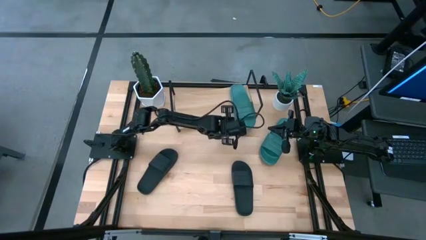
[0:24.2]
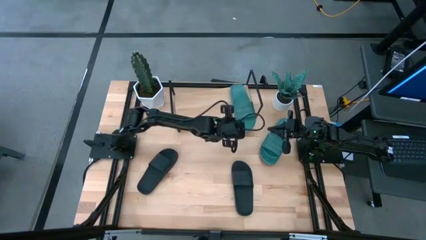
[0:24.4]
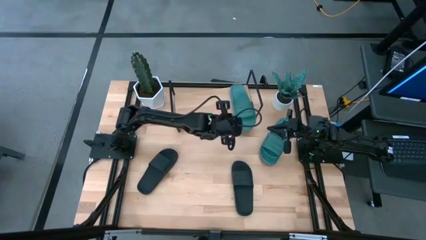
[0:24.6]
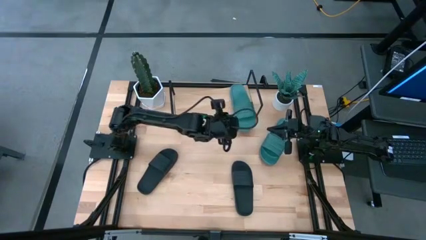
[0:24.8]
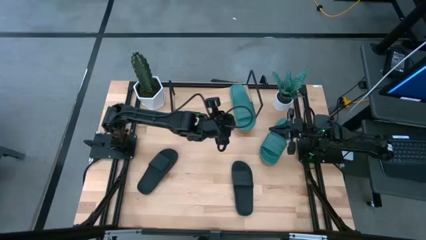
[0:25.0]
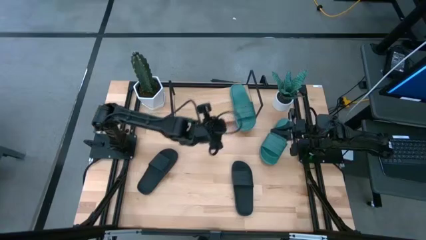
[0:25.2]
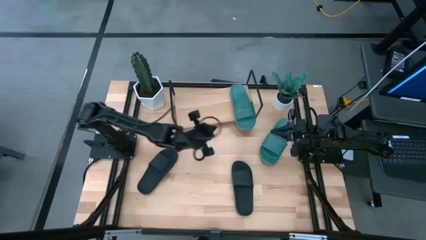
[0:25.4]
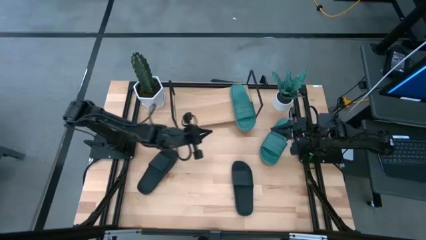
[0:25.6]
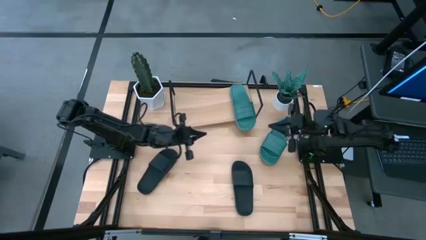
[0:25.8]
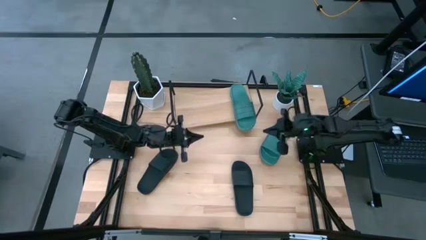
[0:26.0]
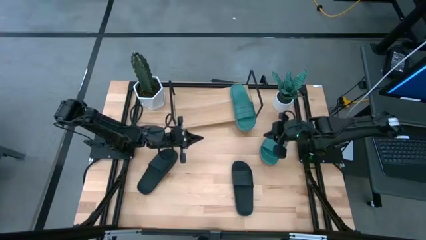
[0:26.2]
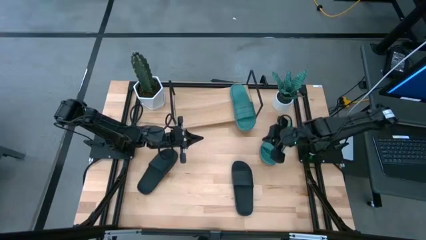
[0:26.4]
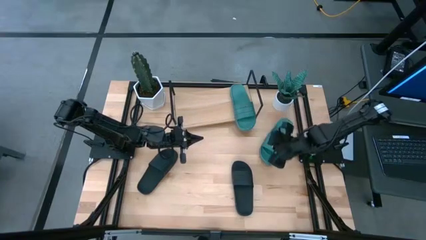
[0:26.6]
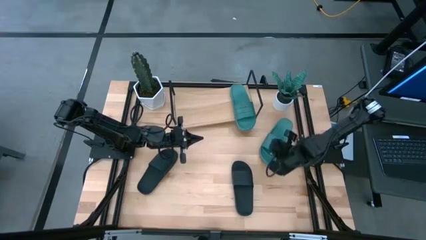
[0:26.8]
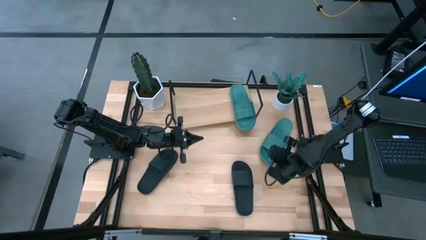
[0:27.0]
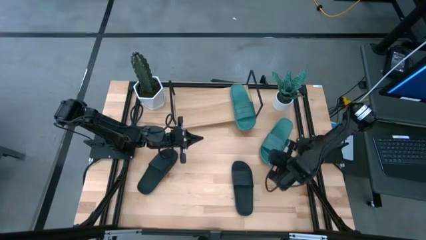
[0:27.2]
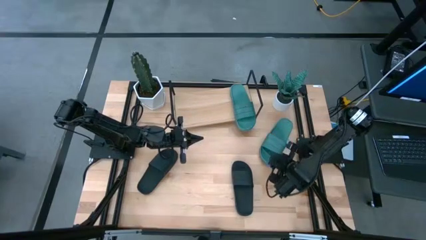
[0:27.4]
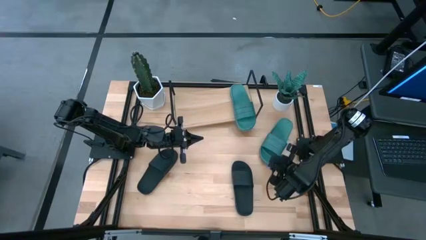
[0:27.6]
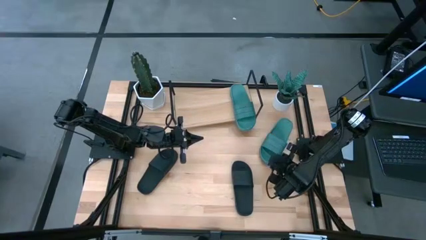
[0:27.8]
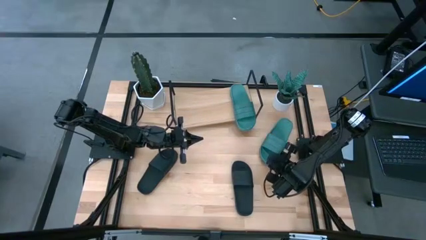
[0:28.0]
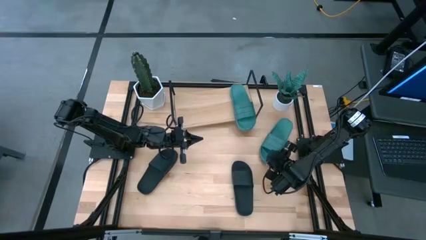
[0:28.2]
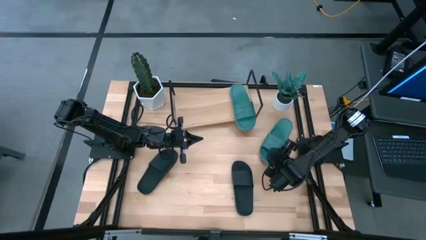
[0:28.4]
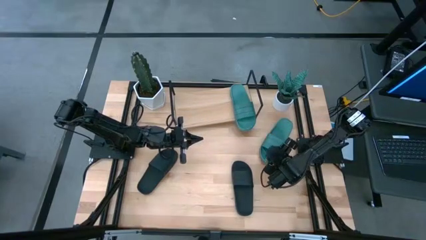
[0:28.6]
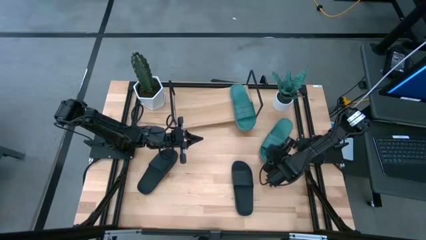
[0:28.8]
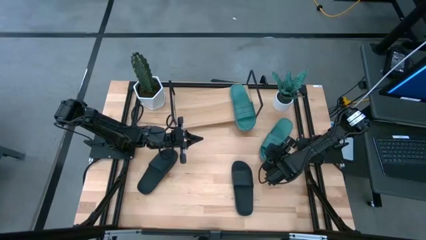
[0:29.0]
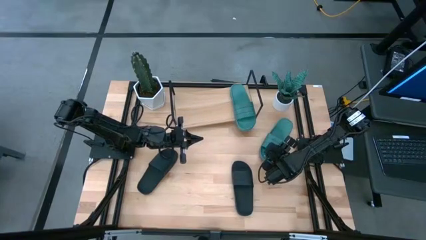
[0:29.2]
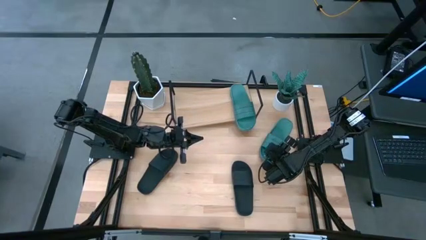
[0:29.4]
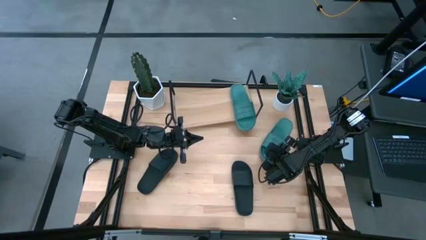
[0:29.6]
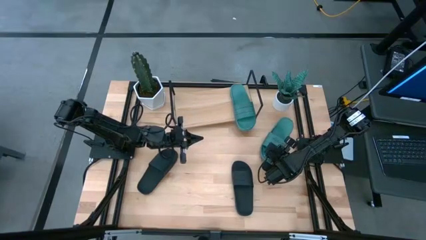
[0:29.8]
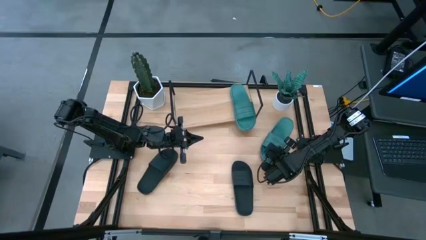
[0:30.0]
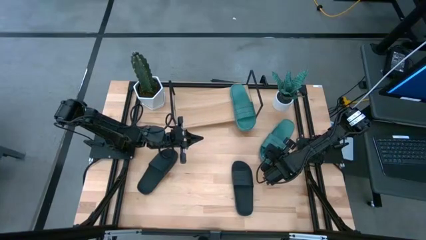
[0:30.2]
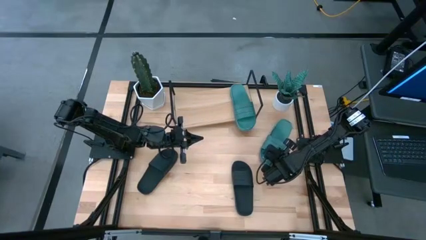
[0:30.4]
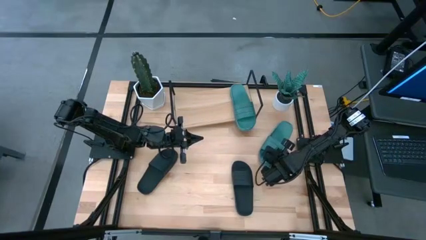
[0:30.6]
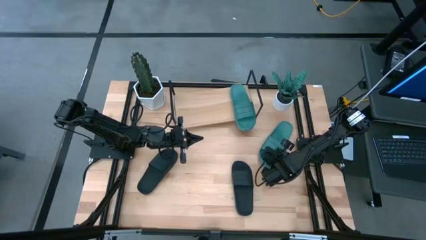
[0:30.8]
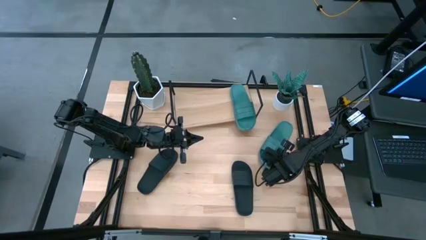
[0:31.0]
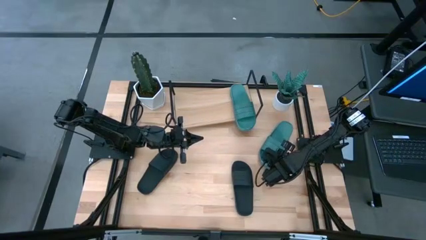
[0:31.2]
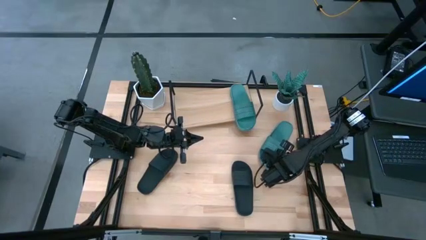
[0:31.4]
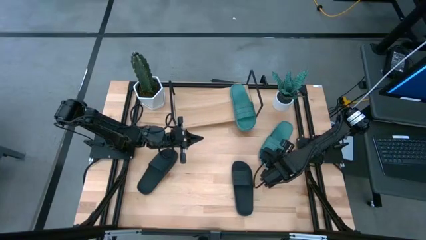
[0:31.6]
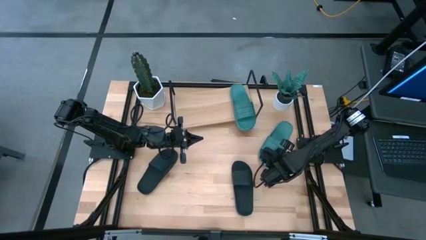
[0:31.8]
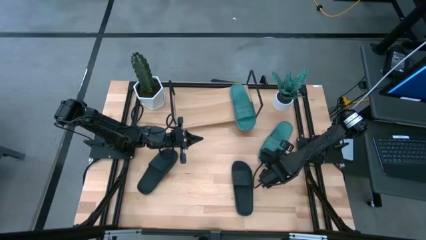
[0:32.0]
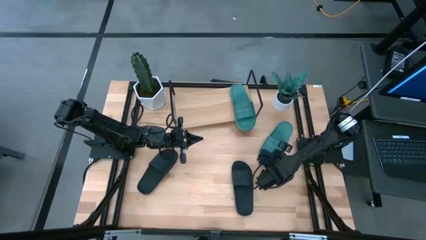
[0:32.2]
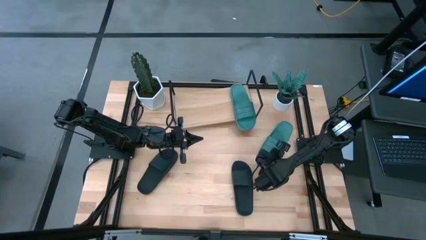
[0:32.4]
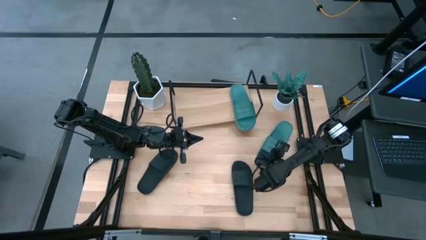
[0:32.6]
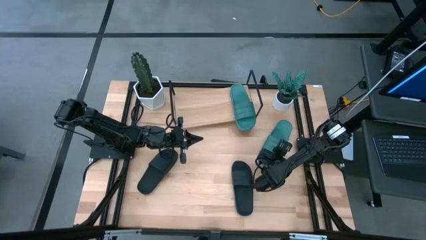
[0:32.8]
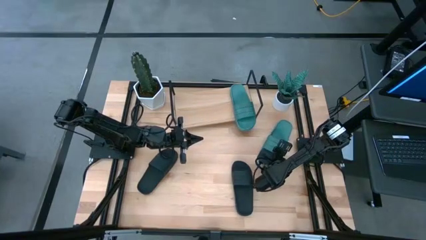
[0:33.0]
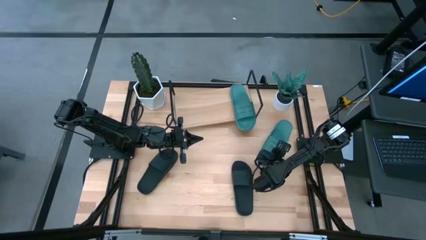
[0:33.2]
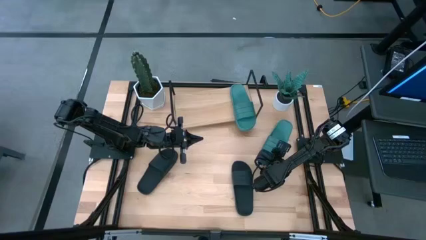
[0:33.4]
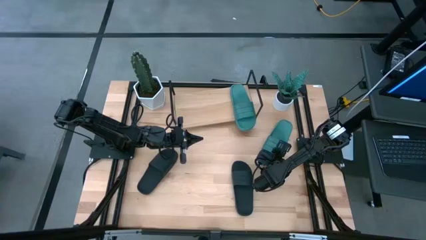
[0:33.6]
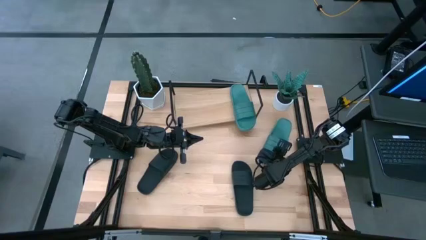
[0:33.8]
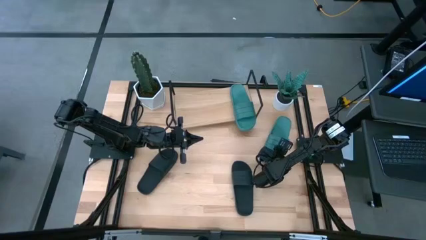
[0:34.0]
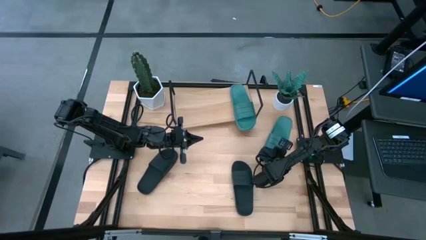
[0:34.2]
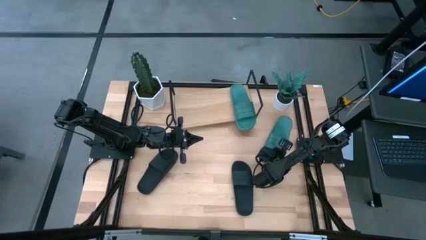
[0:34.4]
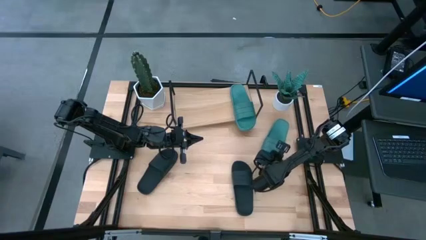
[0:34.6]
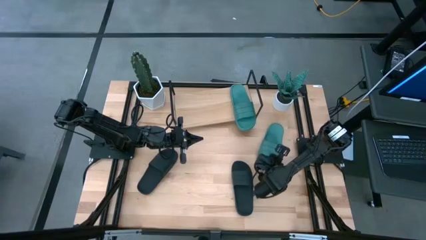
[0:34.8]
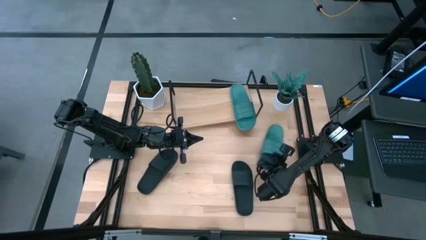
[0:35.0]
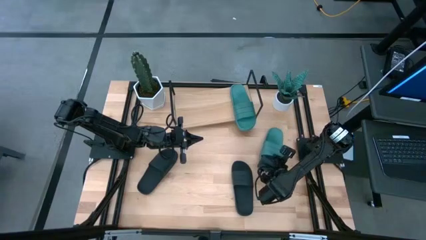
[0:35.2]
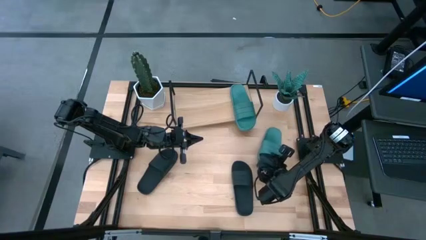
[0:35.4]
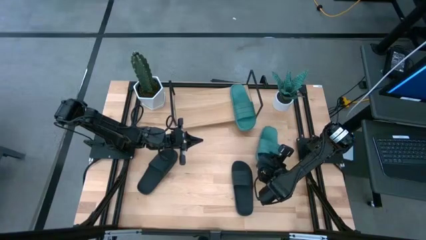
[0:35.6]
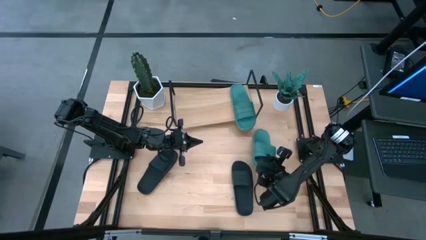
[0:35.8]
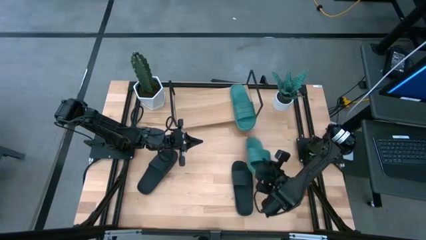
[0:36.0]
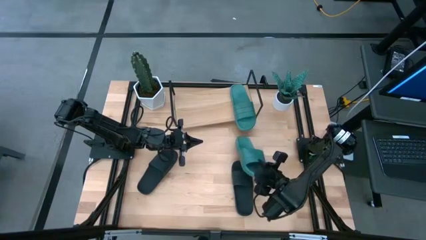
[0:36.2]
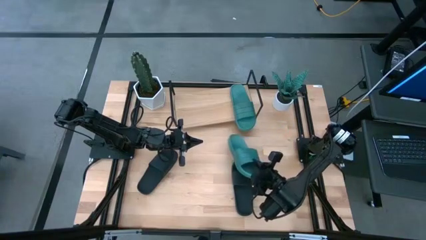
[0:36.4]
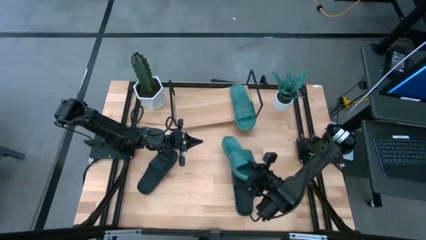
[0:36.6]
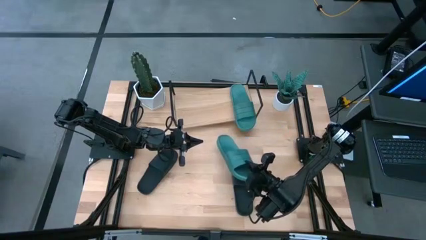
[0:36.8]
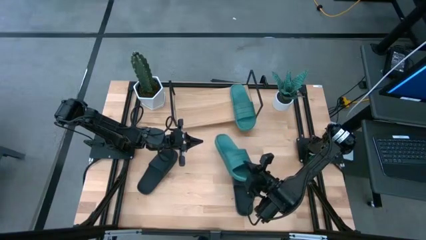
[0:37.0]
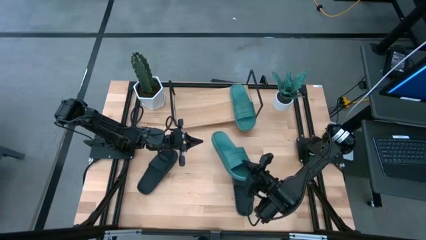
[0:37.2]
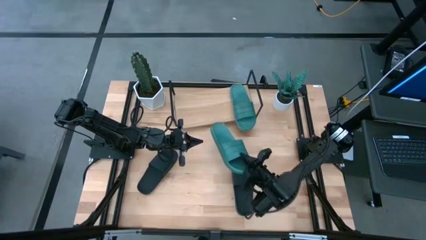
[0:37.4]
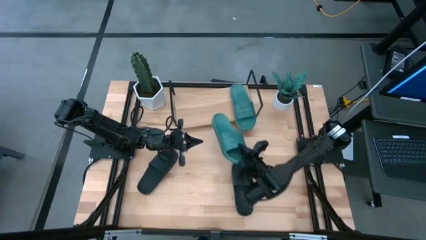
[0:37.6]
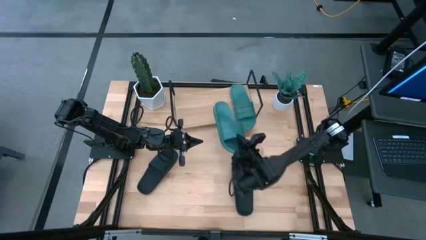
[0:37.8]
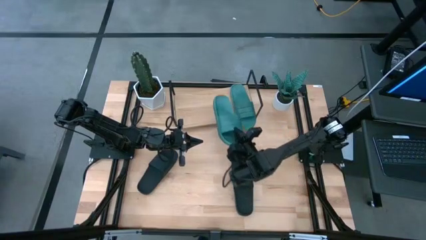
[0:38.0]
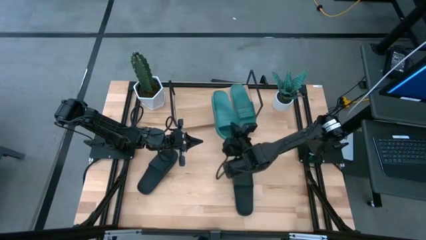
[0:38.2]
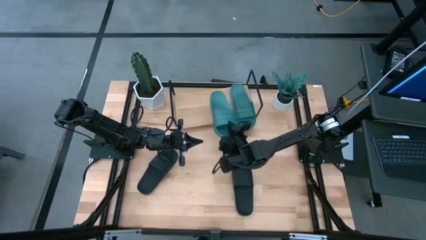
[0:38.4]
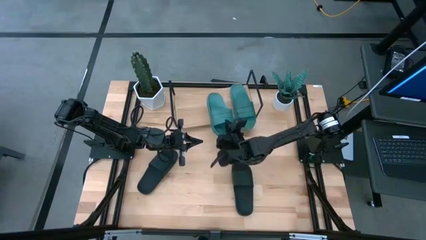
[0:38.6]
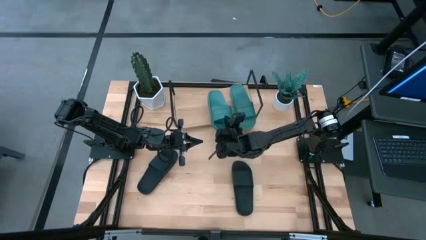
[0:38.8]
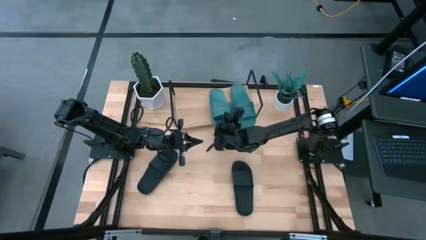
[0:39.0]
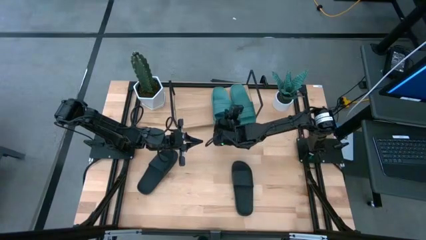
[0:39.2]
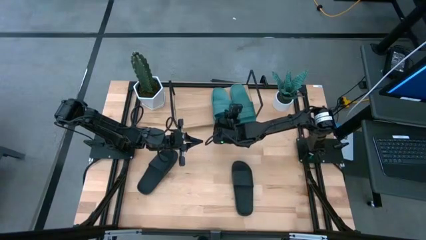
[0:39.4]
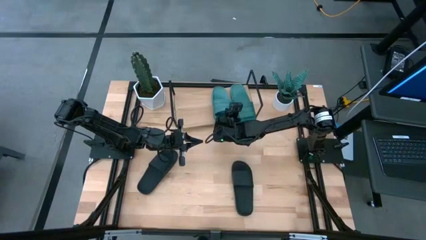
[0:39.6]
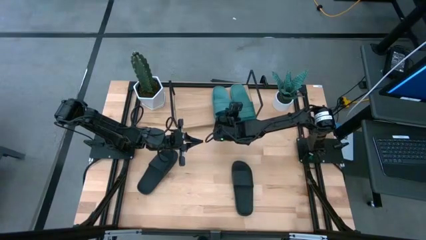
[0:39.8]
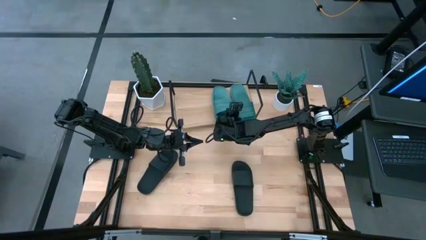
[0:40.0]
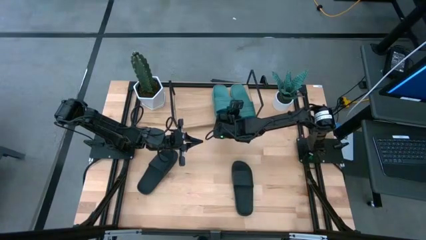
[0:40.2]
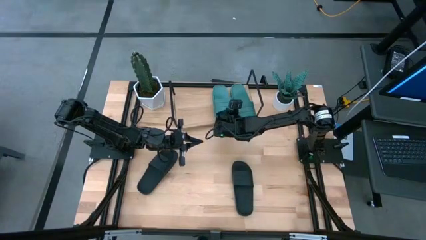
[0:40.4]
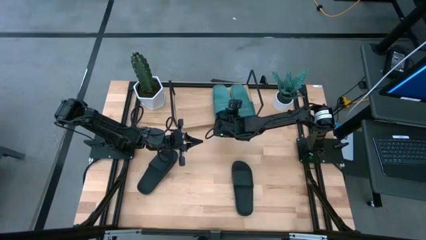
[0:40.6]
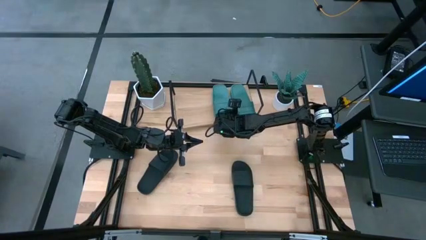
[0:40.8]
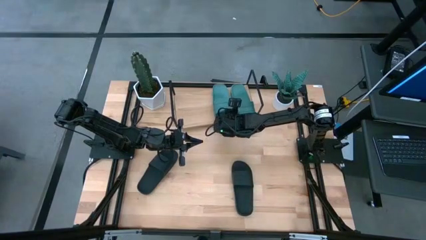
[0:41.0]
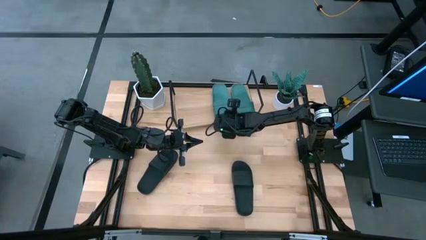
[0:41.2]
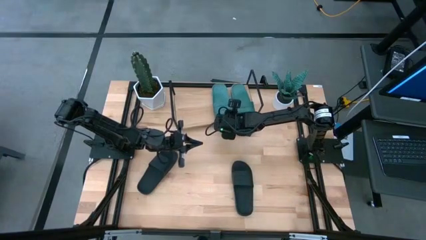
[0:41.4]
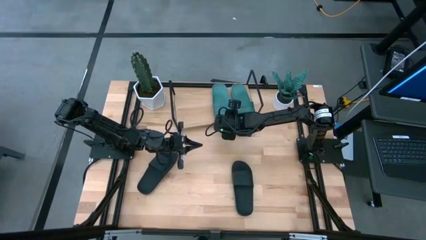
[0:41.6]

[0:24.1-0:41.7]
Task: Pick and place slides into the shelf
Put the green slide on the shelf
